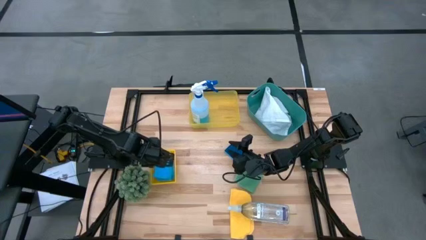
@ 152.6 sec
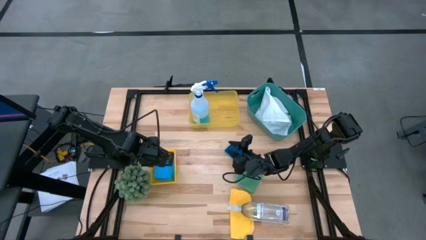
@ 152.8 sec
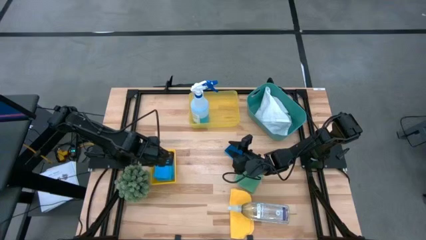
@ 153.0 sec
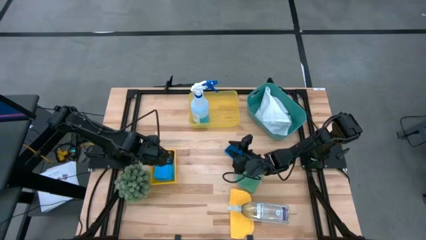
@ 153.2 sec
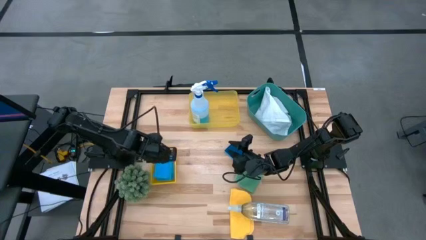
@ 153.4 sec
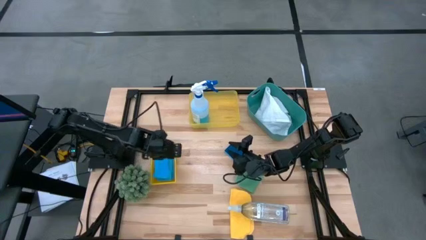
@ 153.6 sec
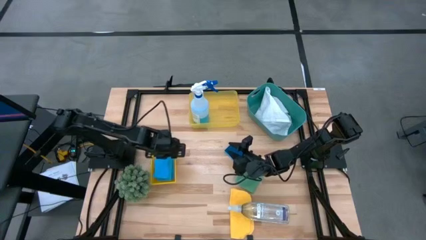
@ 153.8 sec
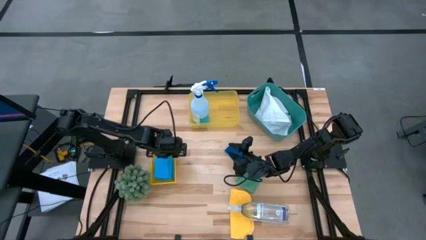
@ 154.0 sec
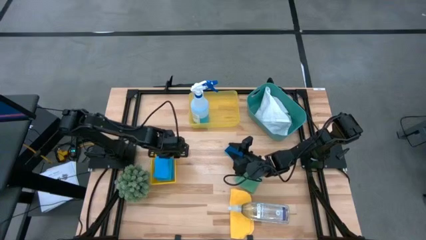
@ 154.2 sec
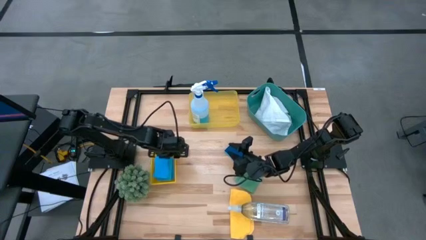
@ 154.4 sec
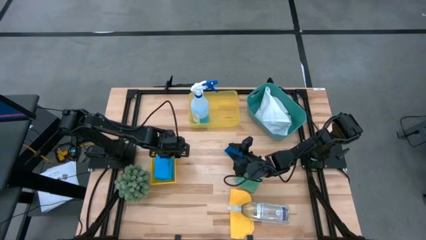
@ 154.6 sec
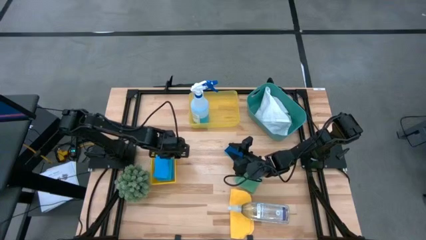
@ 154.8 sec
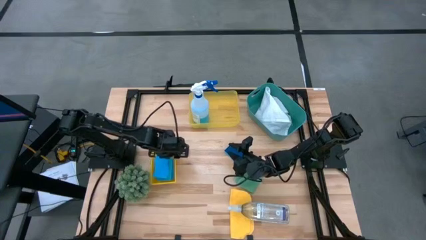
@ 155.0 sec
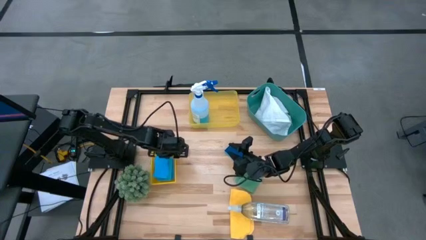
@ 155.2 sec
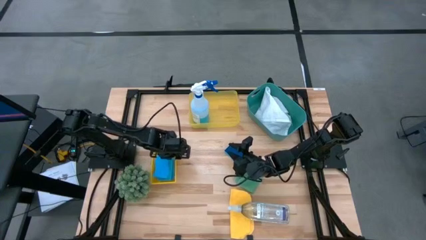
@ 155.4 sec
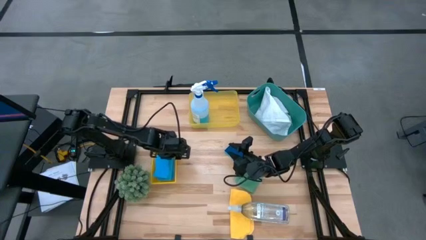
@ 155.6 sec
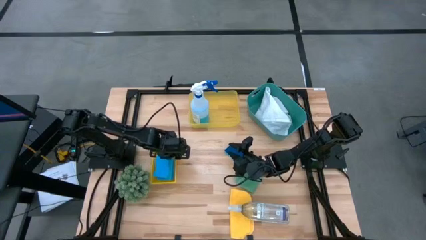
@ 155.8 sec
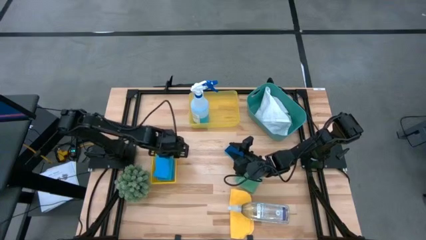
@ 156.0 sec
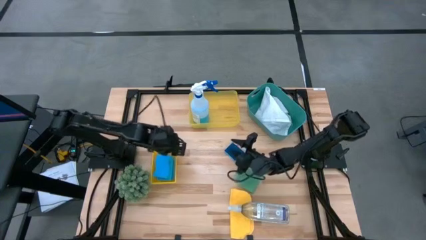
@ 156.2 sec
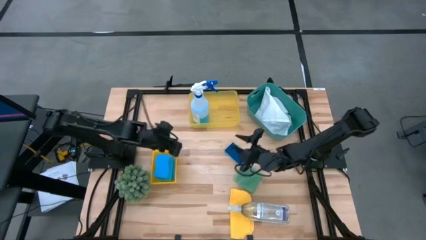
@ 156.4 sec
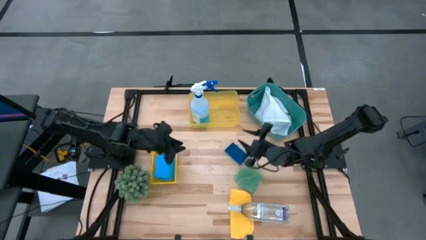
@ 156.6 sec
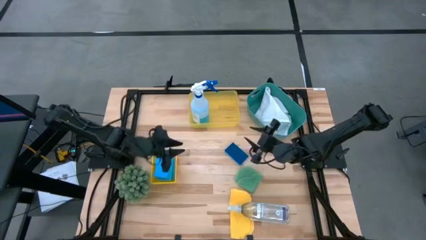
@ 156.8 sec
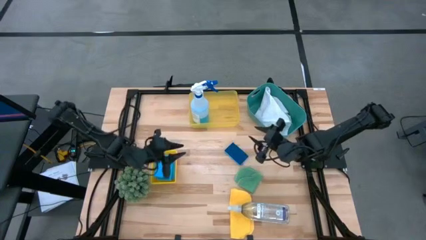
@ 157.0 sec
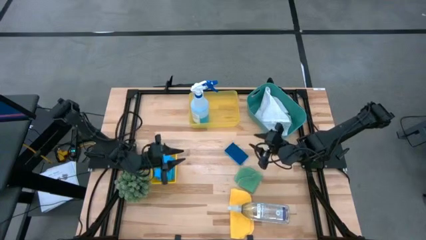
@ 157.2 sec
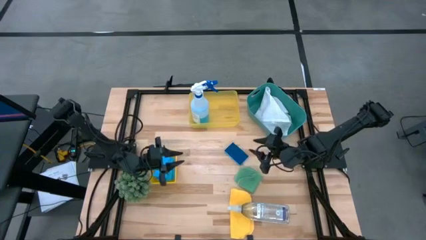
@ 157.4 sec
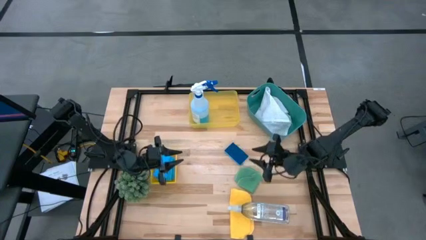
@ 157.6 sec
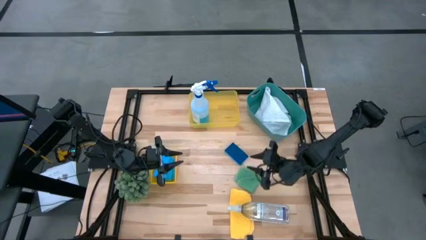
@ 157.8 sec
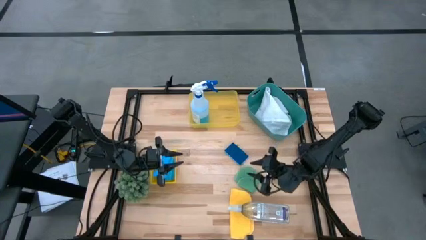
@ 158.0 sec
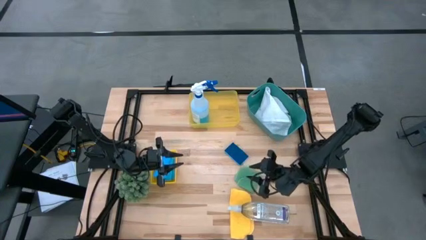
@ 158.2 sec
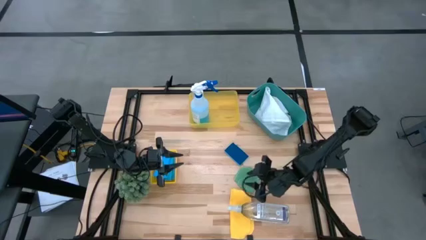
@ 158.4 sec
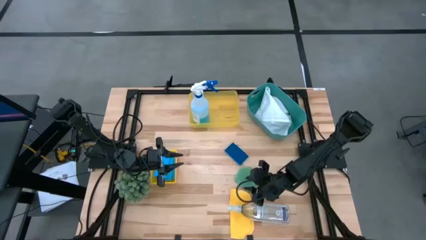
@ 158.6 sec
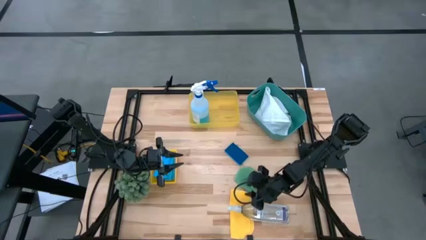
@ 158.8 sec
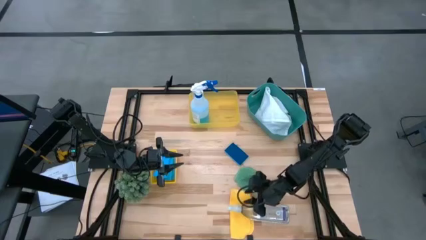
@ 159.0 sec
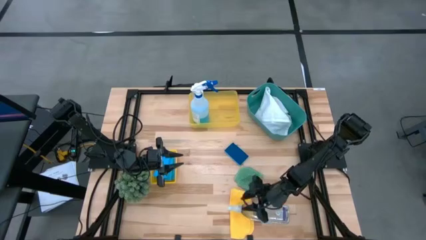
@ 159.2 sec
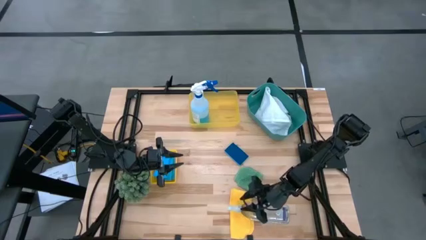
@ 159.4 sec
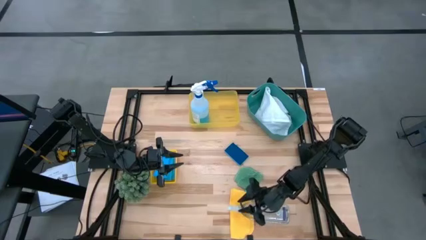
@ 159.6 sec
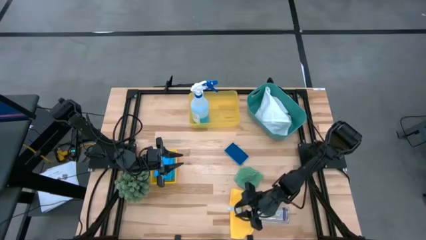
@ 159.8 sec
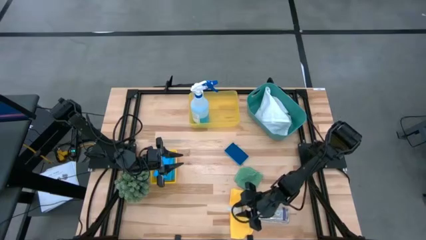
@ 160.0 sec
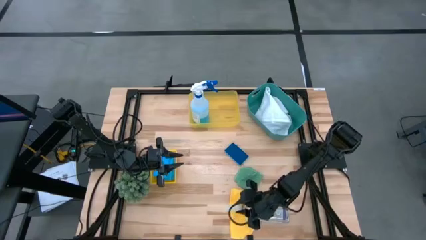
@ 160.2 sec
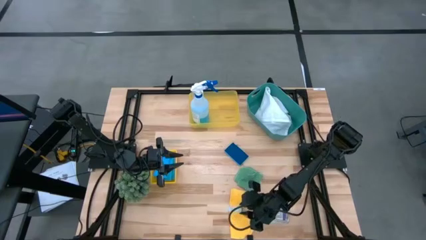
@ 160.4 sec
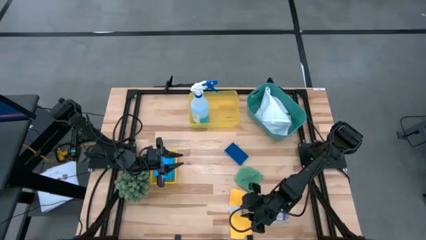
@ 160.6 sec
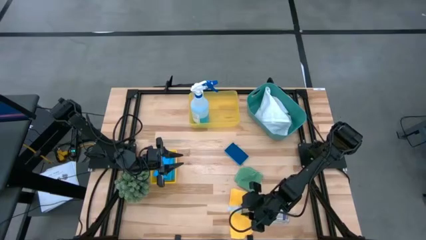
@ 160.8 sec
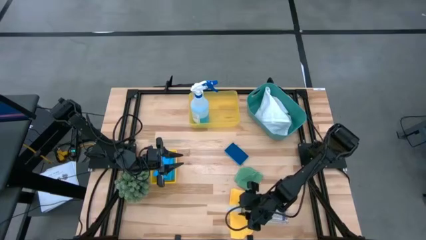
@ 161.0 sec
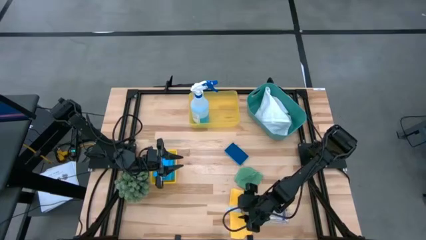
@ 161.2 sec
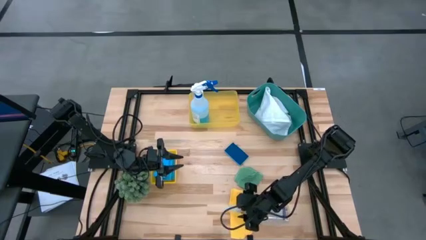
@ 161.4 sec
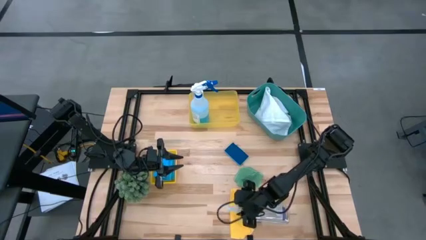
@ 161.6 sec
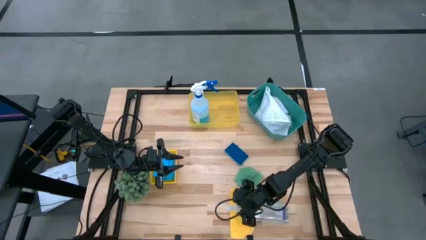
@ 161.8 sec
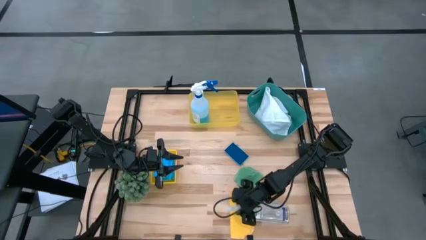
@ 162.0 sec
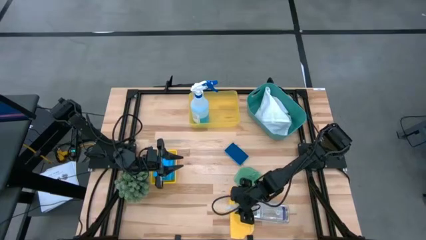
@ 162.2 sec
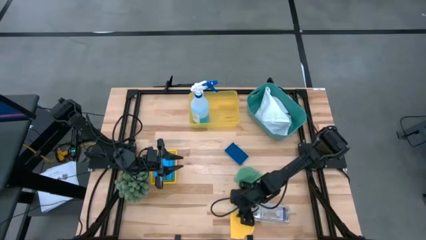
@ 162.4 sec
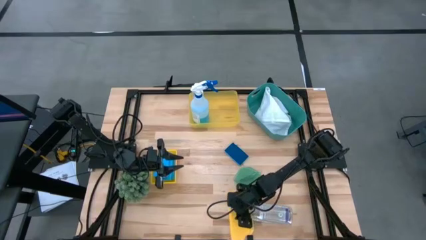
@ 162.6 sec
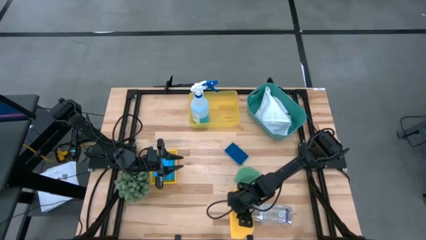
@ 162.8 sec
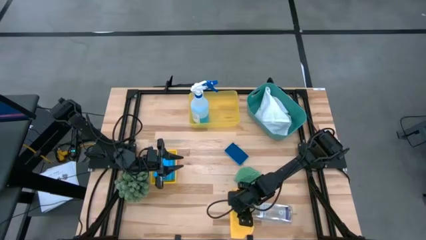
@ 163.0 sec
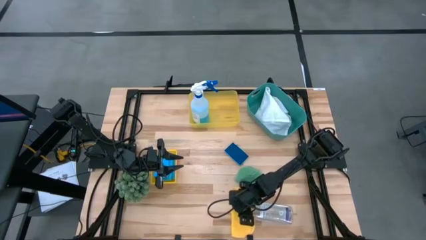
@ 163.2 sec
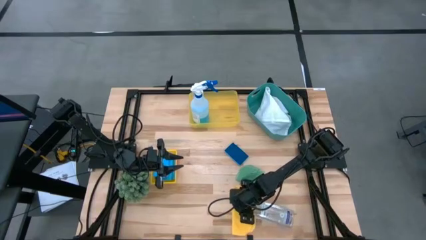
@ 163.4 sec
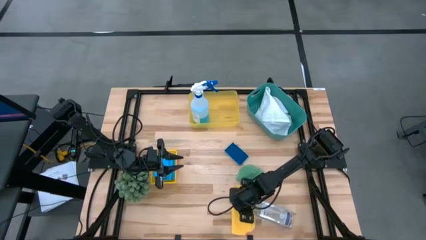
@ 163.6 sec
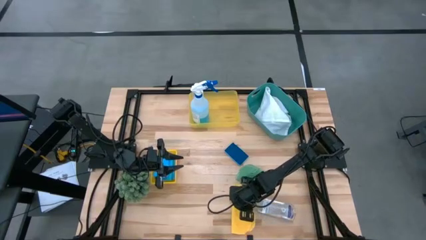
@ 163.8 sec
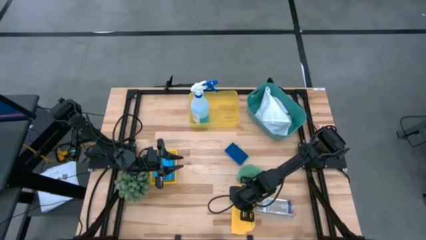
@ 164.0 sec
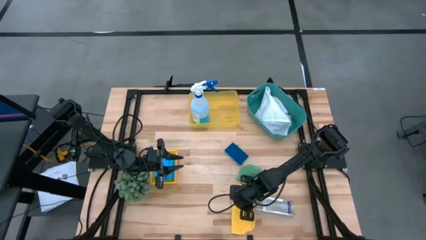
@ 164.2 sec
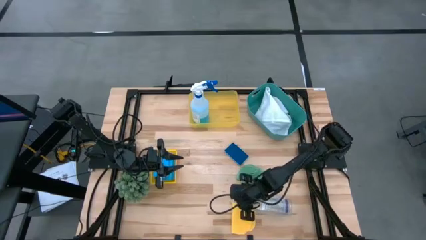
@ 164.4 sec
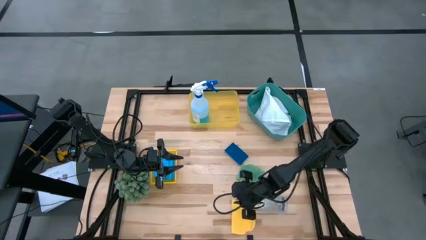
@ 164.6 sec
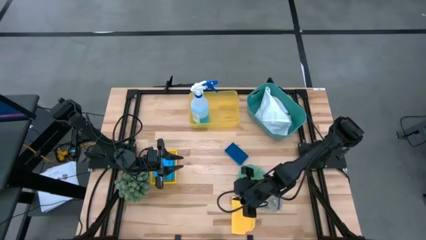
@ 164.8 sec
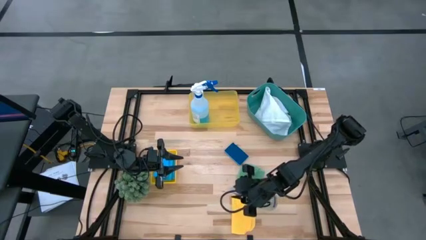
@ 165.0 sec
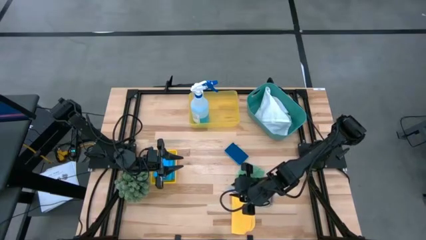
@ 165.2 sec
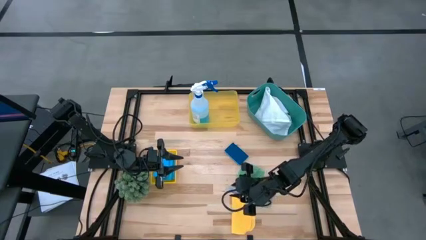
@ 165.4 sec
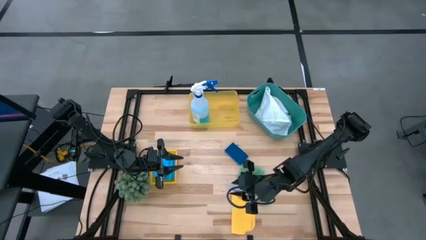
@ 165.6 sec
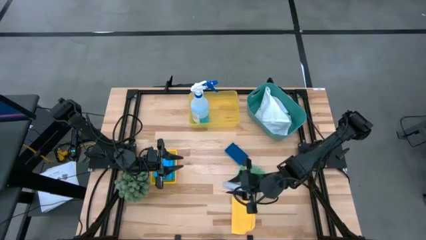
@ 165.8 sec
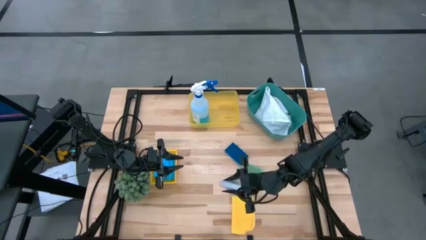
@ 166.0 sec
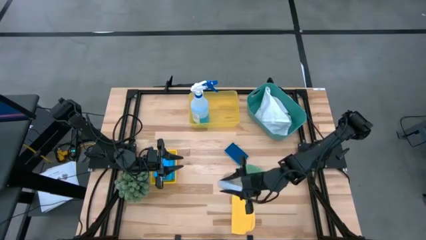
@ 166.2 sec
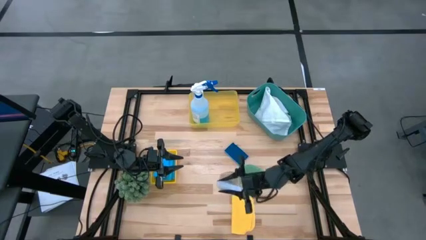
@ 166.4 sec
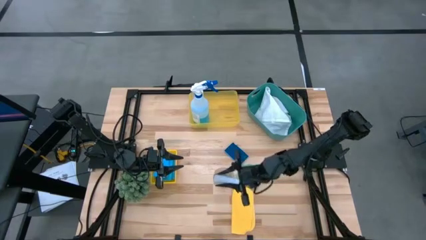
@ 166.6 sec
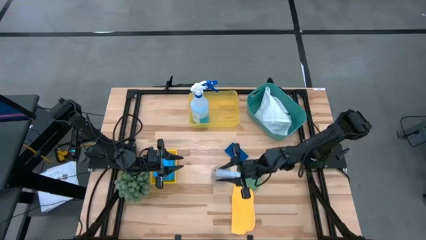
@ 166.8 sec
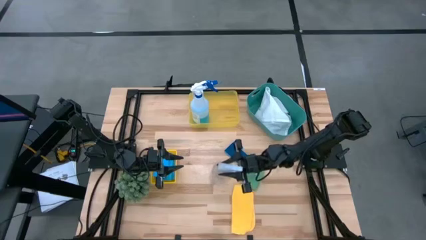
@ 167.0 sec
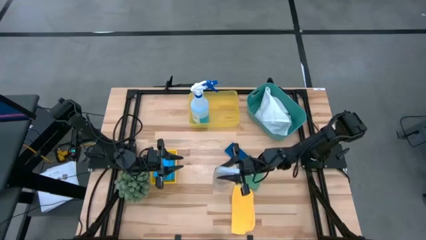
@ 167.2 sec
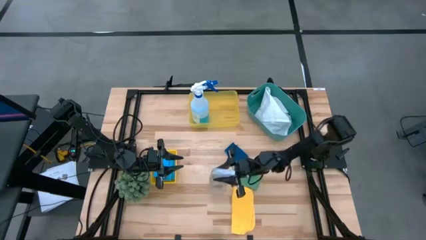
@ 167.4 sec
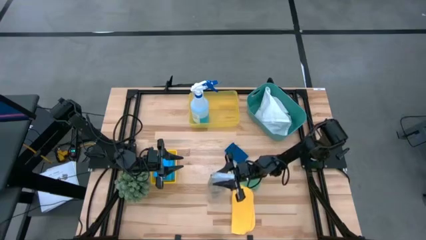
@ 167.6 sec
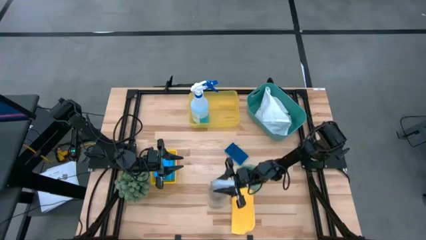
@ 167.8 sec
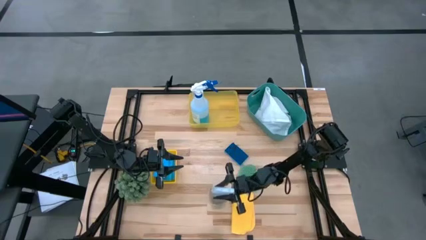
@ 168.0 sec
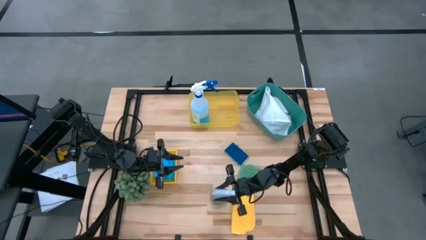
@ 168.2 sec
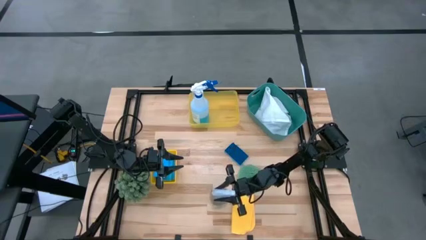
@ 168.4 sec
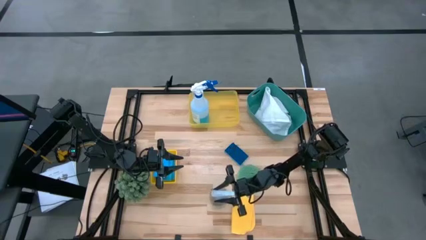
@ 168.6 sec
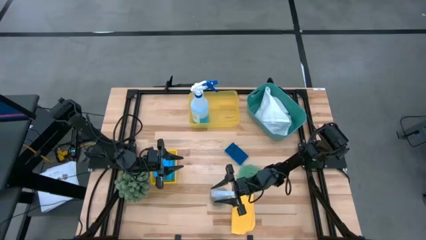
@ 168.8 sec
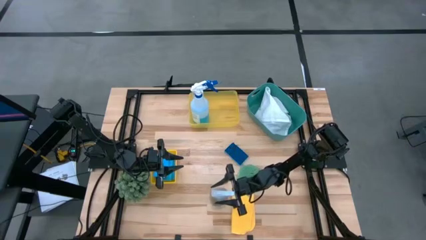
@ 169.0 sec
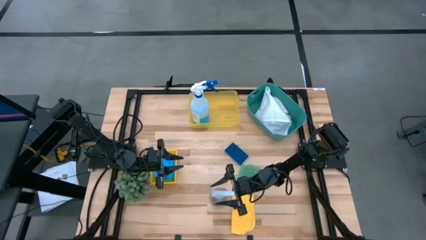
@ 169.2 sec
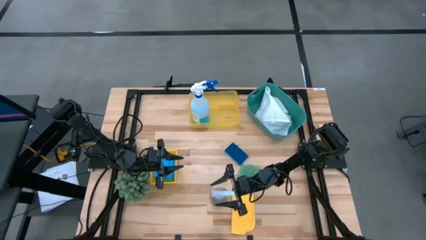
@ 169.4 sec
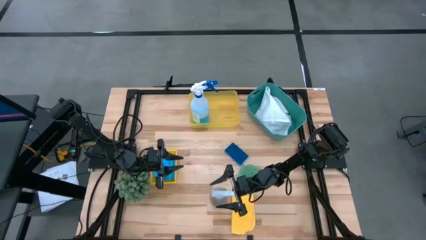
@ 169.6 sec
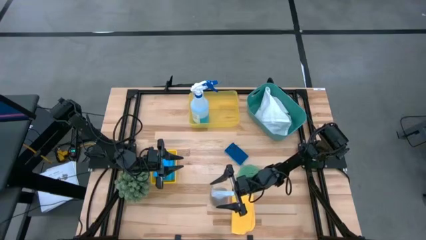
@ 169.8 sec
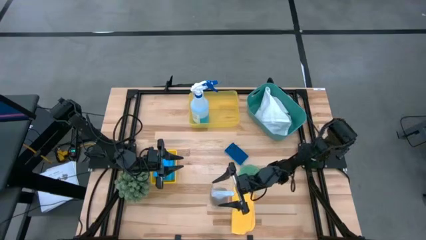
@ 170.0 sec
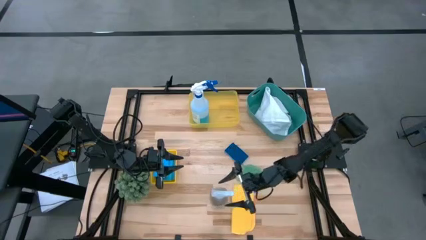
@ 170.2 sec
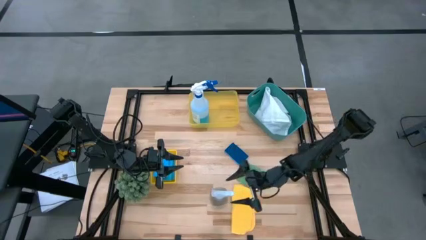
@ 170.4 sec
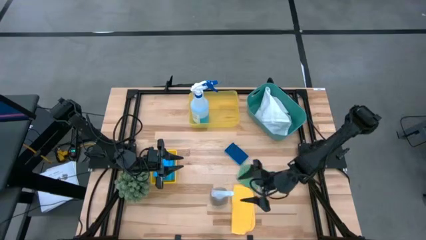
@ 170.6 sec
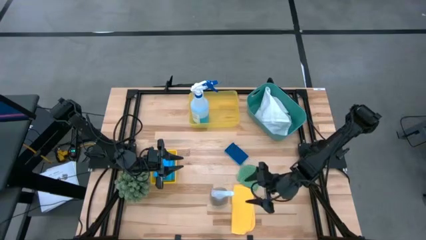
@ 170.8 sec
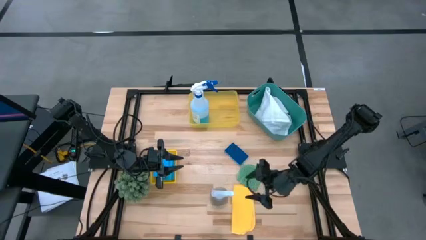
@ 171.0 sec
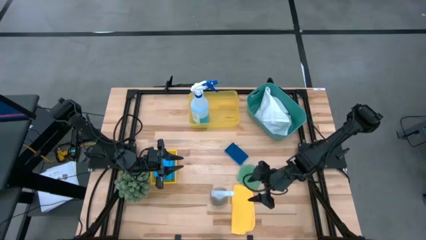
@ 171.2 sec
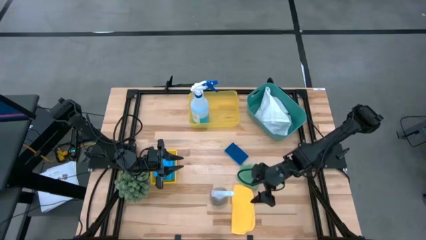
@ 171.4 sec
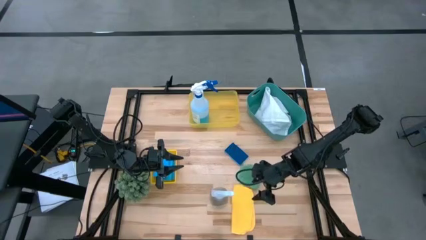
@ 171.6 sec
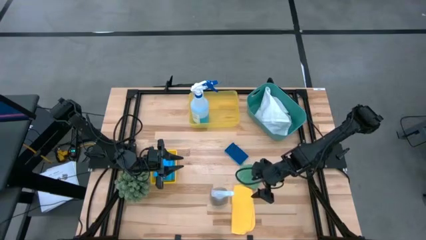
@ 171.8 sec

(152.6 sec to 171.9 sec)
Task: Pick & Place Kitchen Items
Put the transparent spray bottle into the top yellow bin
